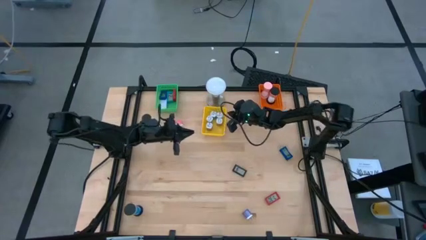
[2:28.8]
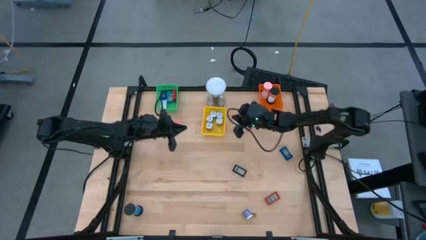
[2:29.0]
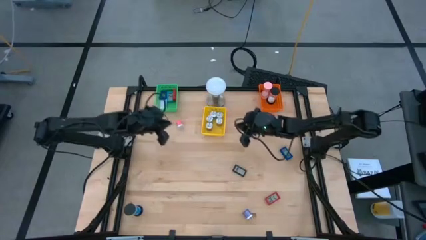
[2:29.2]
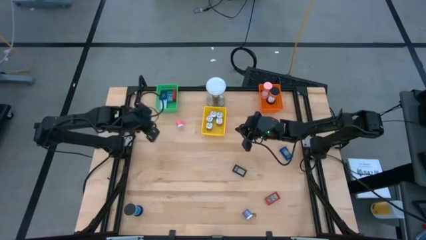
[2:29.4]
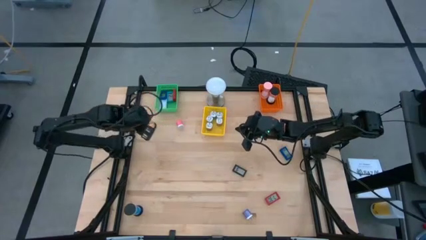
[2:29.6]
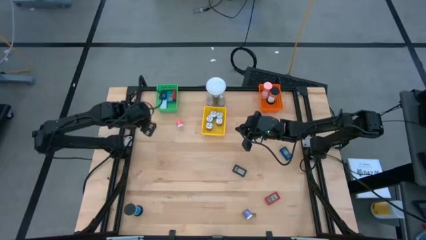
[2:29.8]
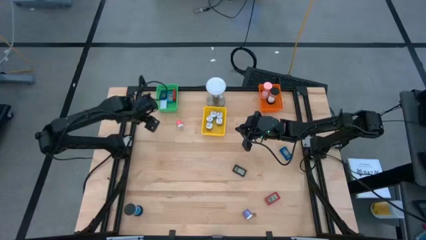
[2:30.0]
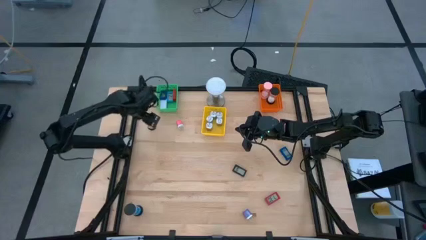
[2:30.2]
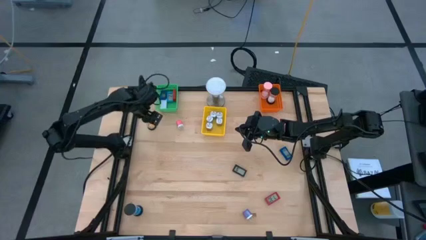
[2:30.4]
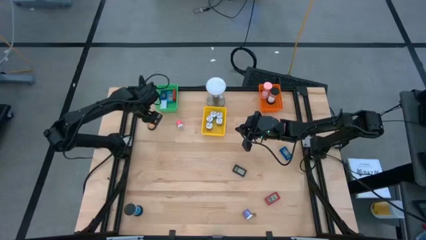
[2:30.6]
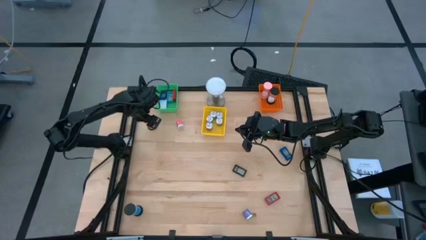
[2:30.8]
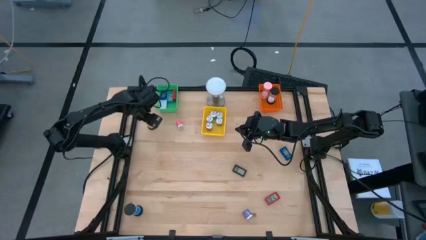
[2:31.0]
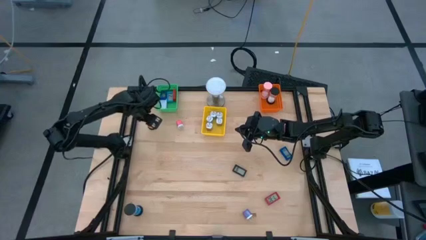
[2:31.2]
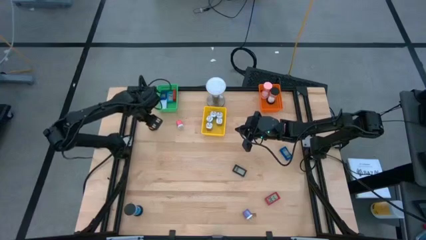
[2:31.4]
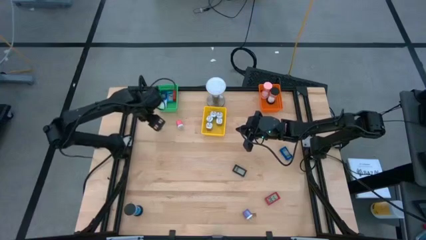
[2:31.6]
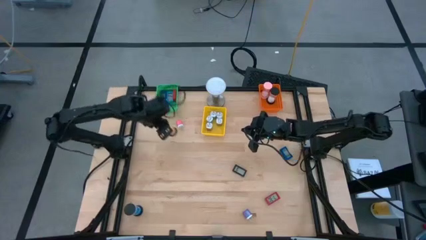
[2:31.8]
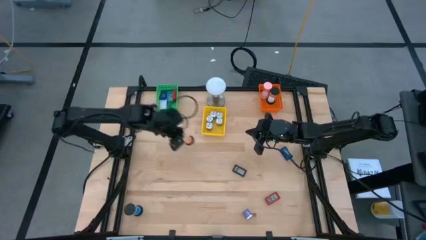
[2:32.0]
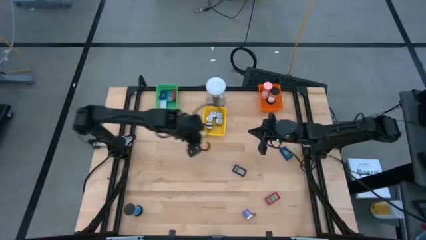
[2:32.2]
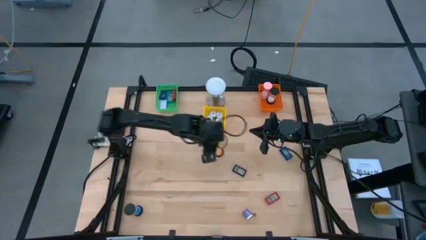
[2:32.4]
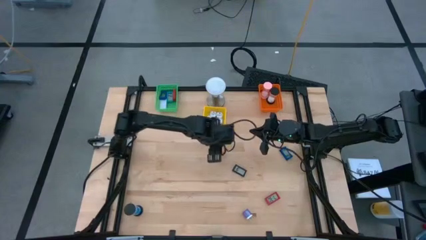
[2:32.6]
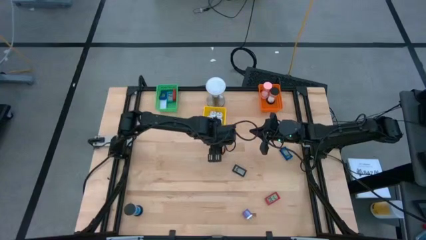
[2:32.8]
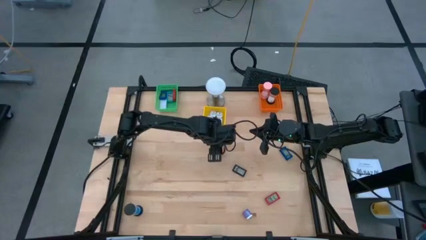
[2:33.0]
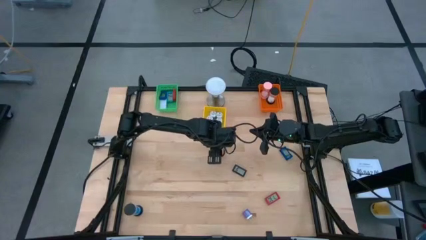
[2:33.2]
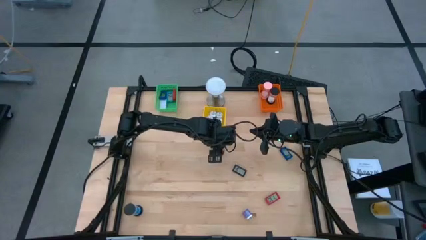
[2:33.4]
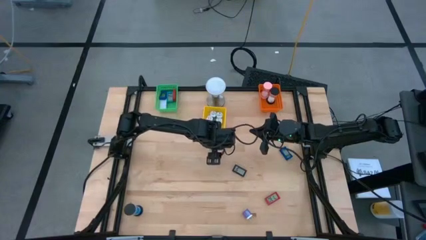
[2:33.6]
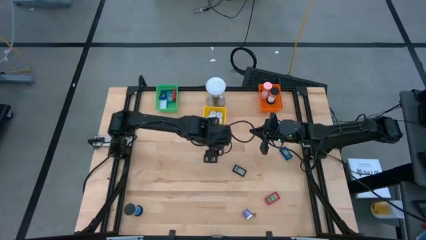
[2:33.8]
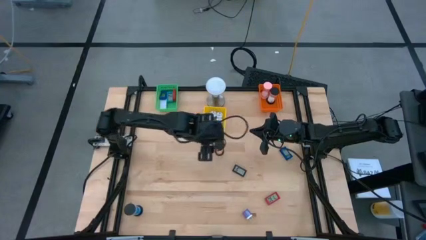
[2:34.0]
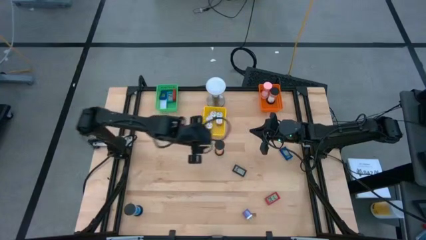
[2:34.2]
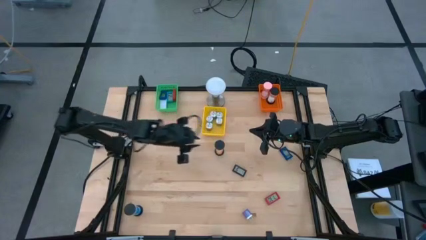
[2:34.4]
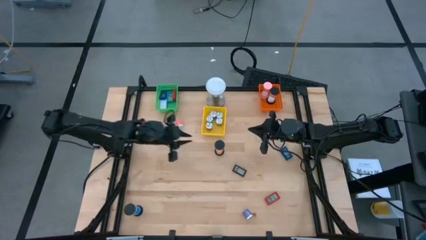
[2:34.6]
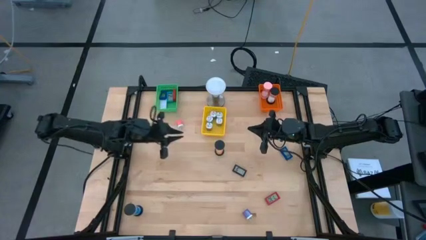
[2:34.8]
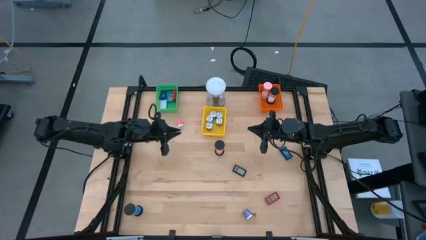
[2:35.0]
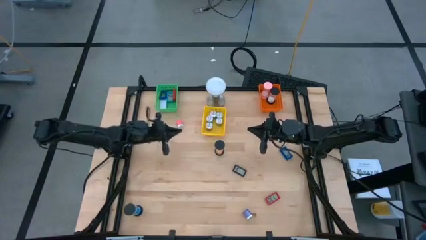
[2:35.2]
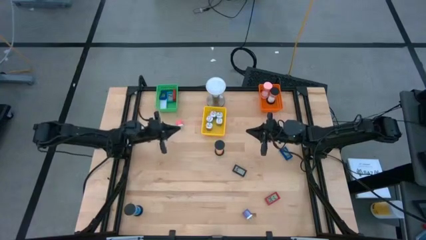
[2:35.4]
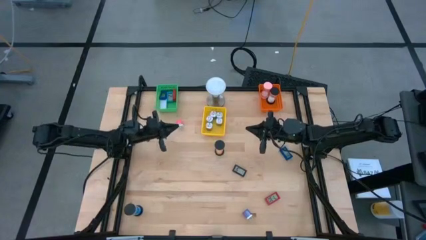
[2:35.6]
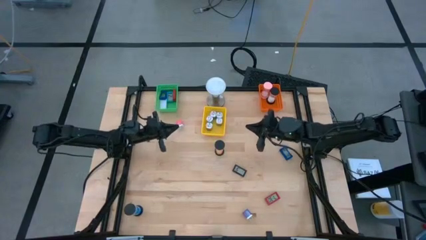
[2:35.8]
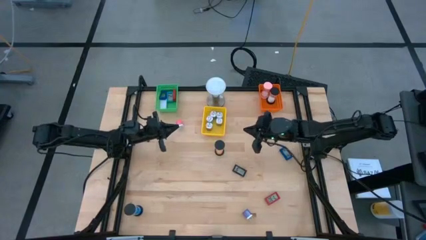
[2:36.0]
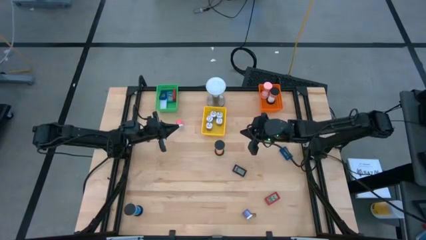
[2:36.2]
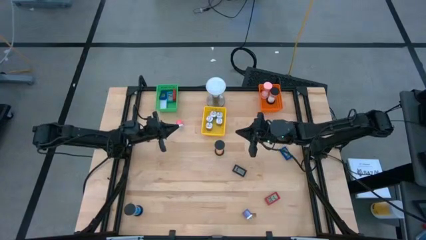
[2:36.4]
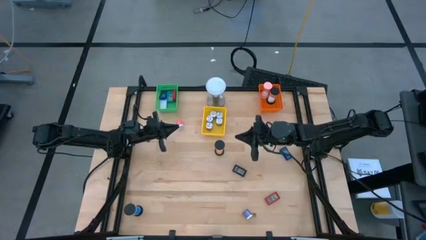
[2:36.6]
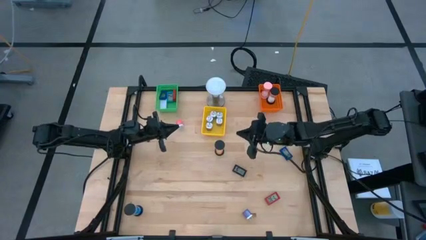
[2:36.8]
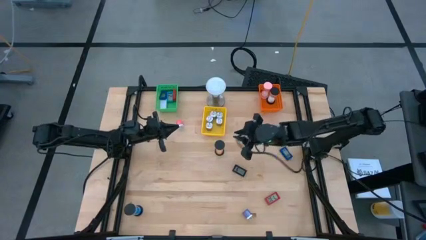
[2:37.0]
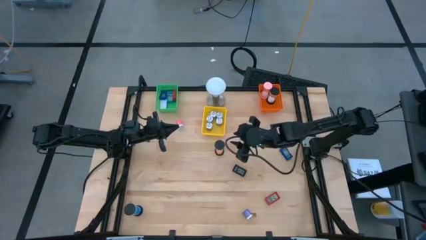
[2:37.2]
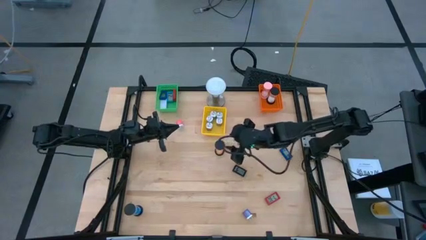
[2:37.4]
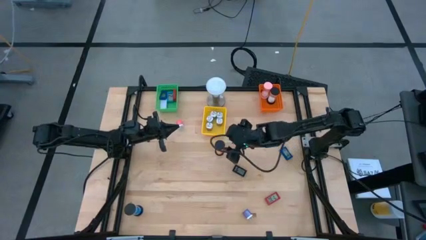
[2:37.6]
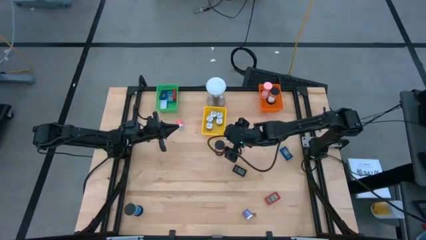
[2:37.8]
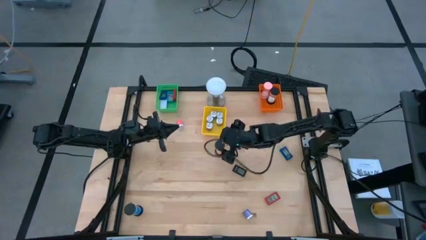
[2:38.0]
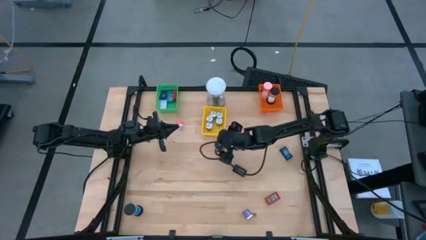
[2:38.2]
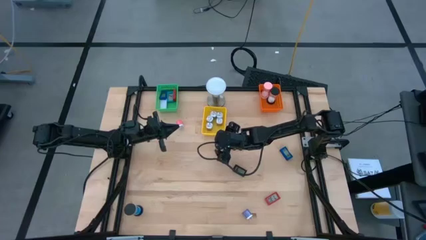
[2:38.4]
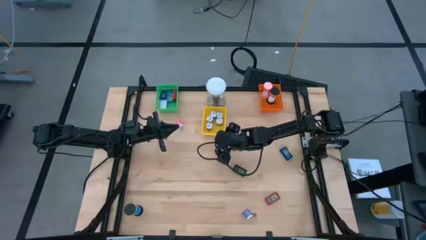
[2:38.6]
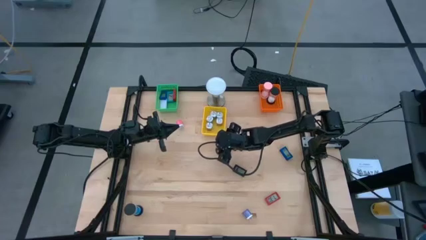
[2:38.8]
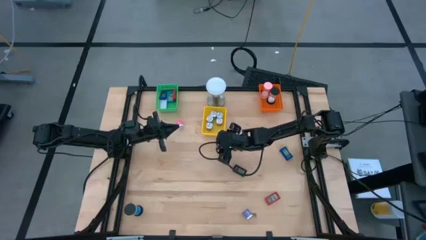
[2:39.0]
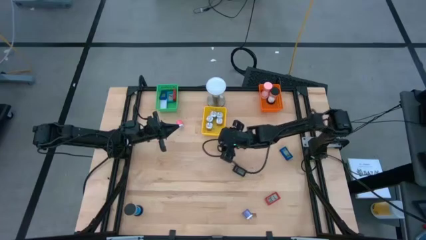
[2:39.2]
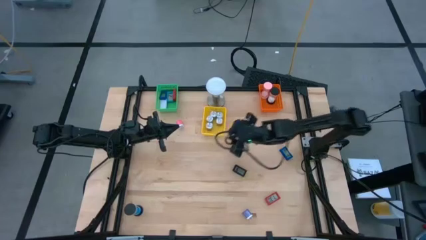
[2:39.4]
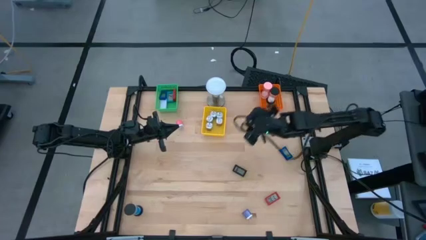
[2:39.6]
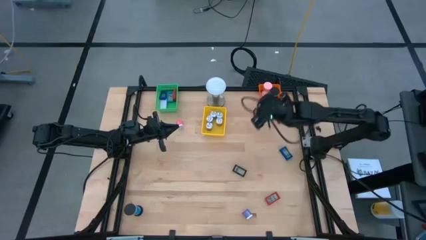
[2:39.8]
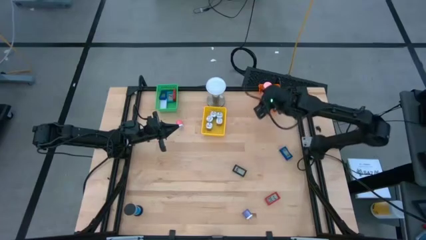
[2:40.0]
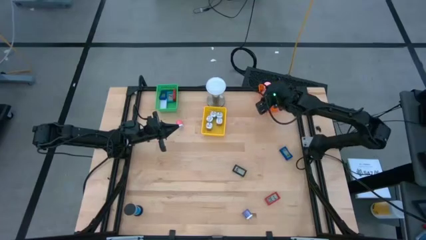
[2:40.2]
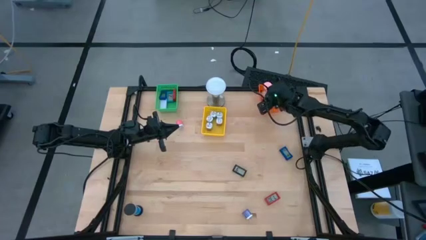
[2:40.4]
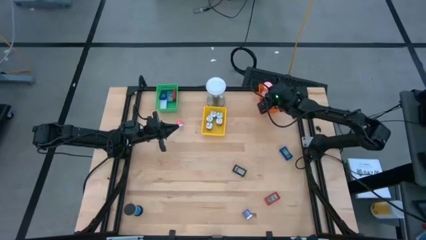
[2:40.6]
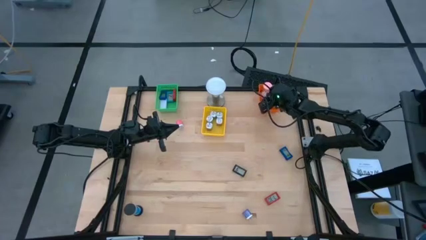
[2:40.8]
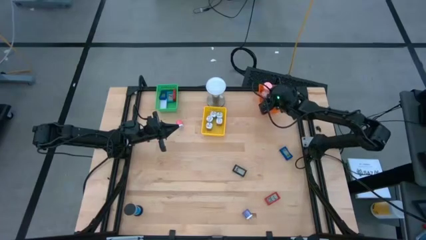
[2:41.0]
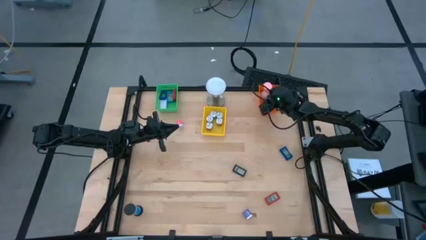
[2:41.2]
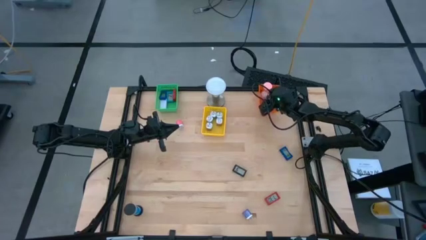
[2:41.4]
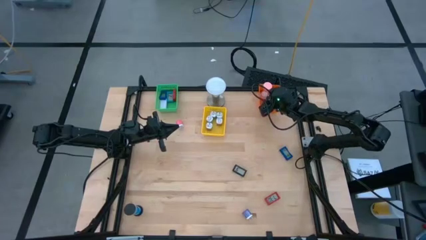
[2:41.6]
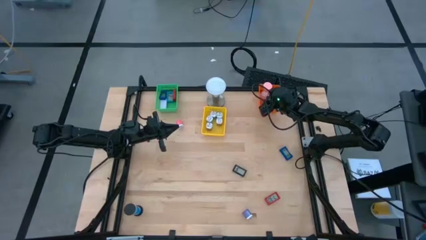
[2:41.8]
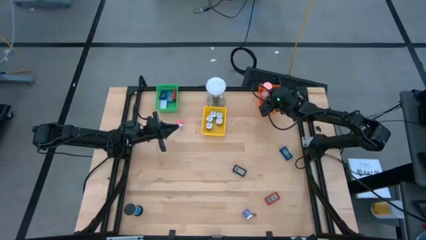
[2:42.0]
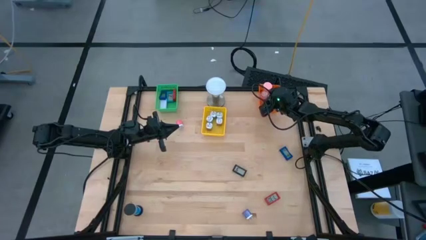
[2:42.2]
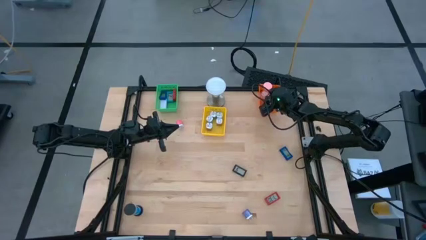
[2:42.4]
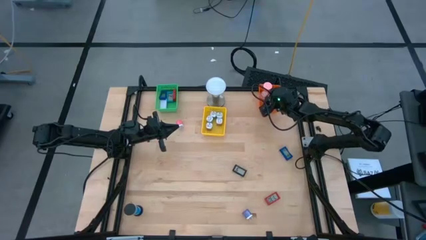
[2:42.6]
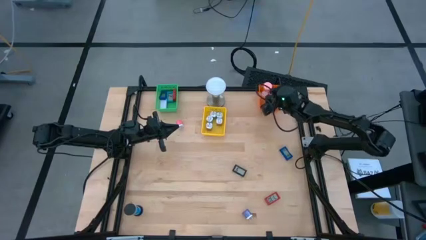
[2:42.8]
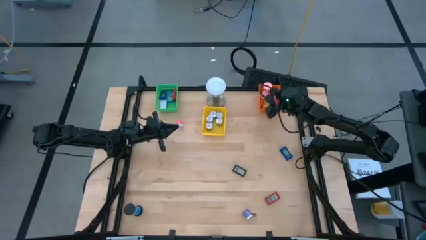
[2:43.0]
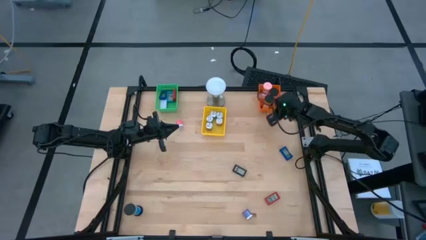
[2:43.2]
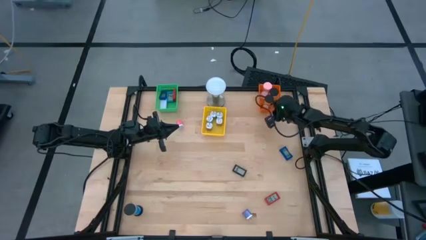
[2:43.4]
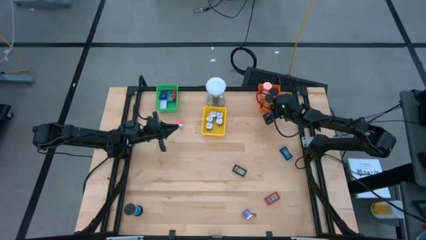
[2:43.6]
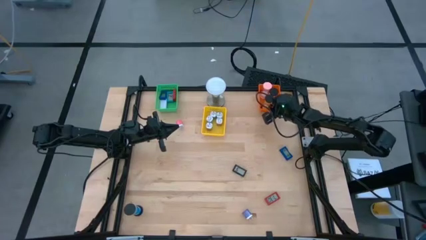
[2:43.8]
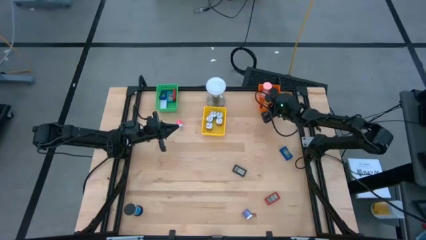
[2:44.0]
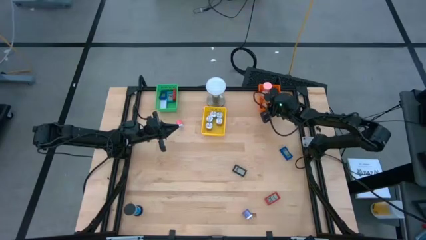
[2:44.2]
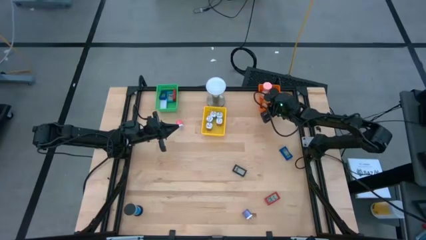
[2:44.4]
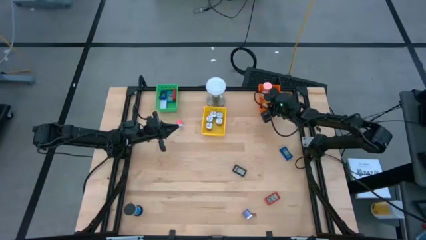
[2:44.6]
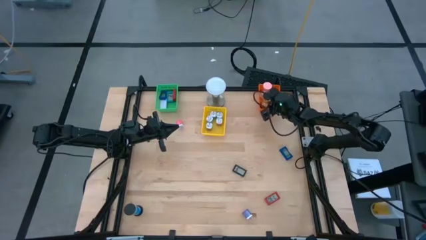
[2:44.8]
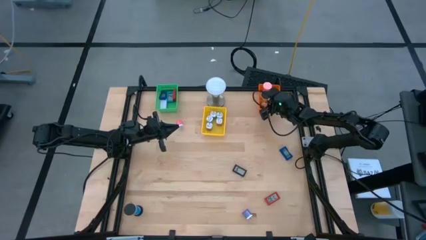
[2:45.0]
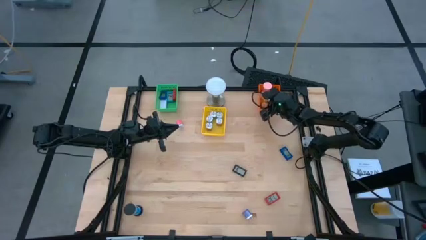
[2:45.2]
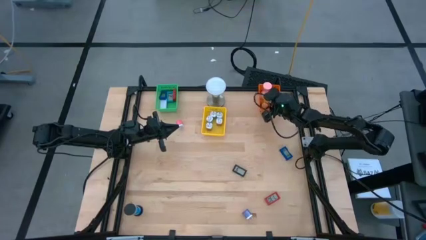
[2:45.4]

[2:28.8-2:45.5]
Task: Pick & Place Office items
Put the black orange hourglass into the orange bin
